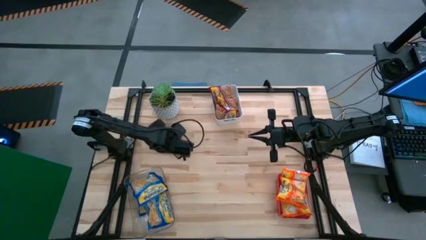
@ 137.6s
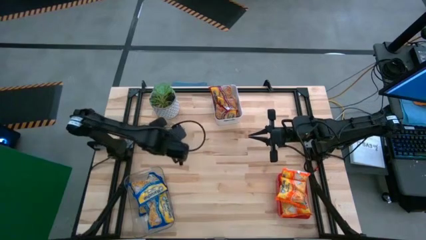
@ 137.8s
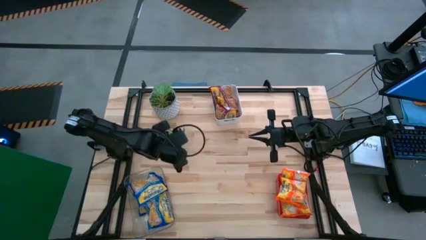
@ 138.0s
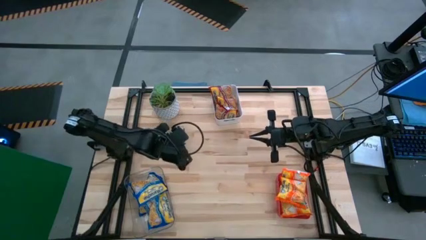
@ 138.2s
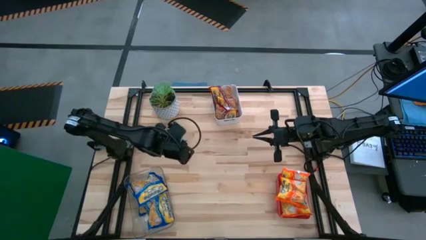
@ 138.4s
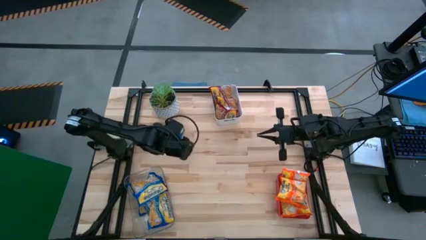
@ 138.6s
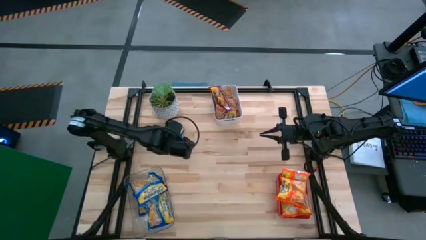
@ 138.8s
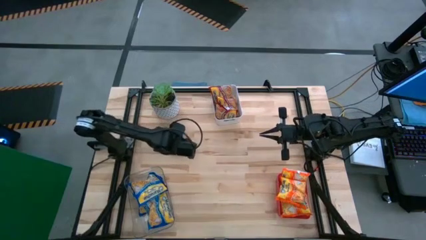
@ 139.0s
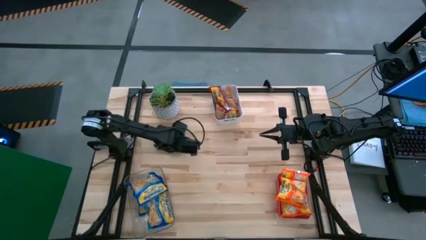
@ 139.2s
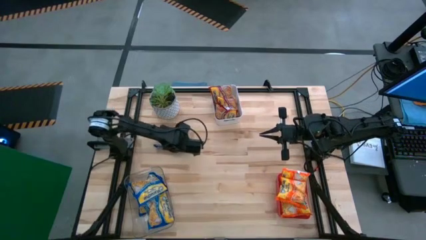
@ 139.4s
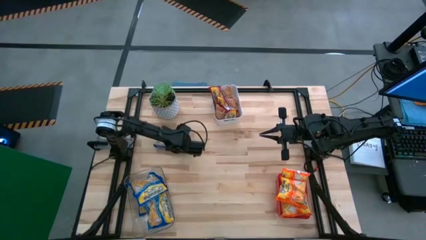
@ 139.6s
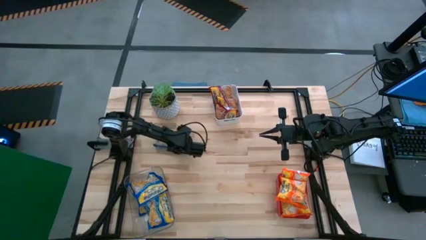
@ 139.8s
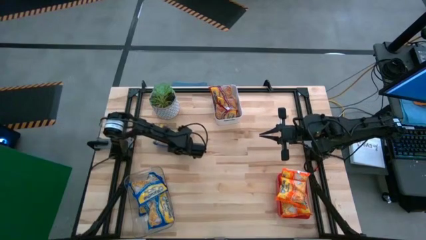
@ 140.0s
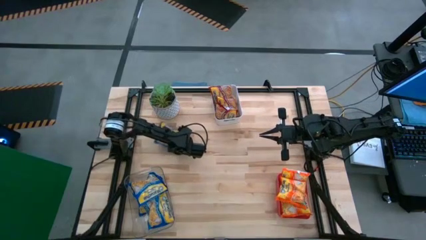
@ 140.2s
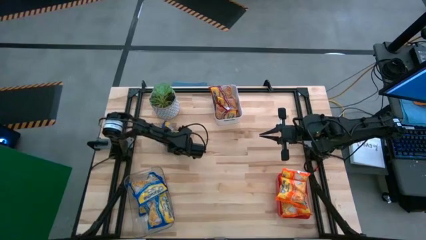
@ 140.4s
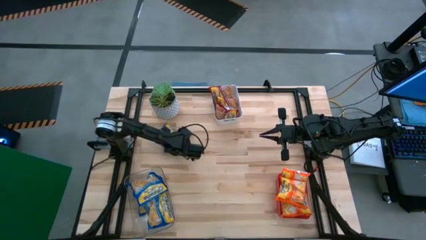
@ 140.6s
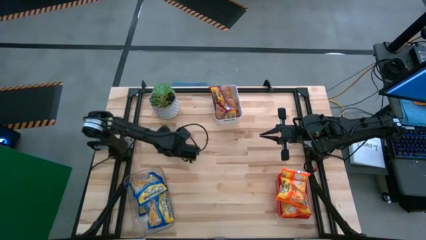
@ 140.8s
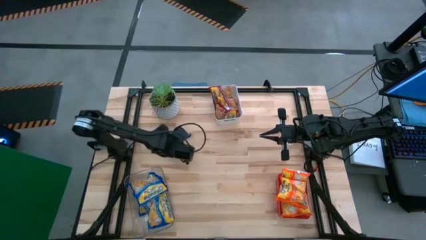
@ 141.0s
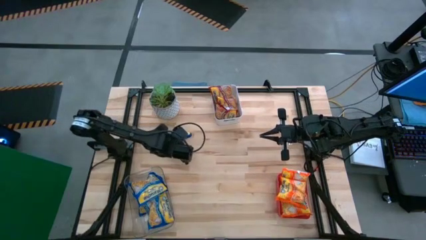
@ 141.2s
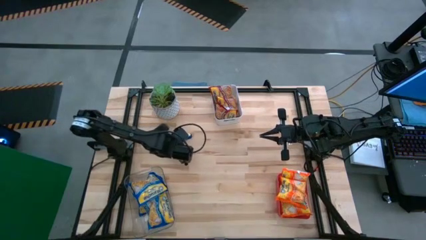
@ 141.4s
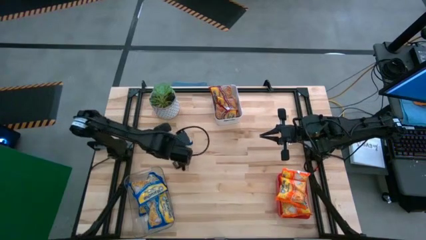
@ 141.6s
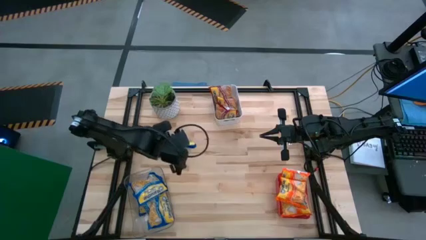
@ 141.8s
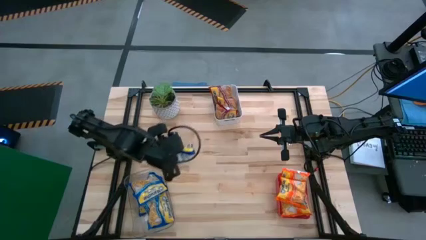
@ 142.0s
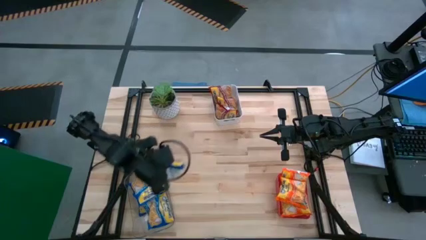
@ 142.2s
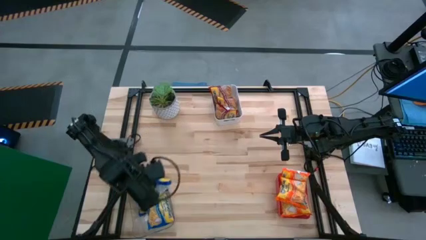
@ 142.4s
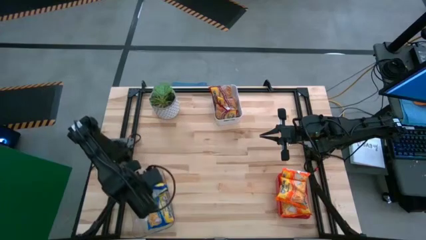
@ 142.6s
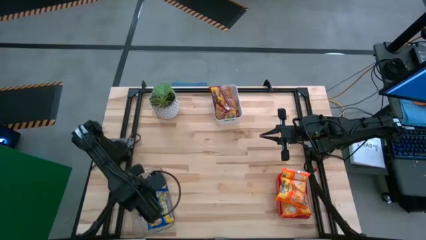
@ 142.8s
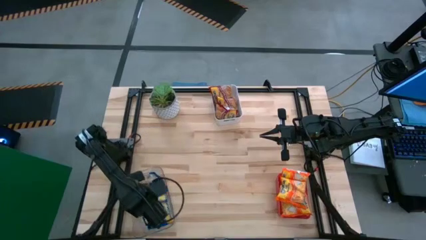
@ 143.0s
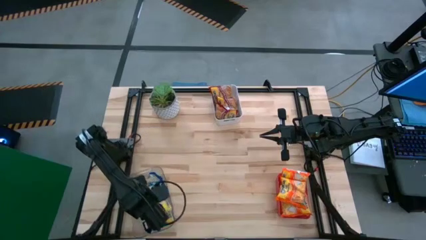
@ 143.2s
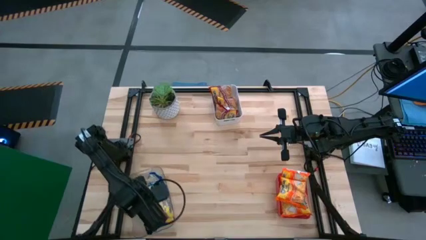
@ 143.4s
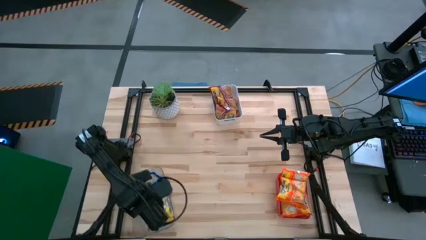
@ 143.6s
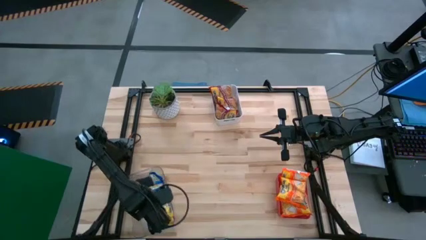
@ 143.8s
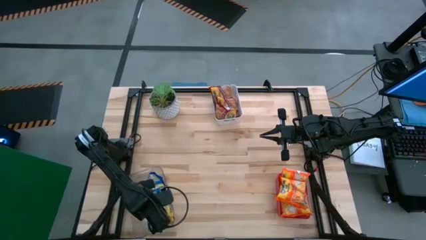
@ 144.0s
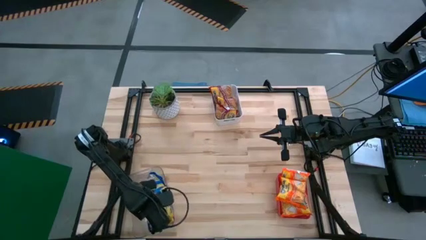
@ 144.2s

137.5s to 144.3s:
Task: Sort Maruchan noodles
Put the blue noodle pack into the transparent bin

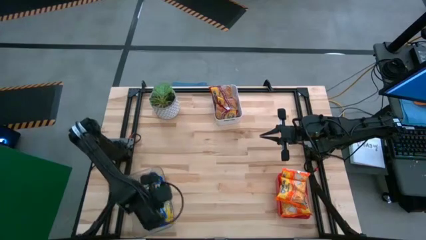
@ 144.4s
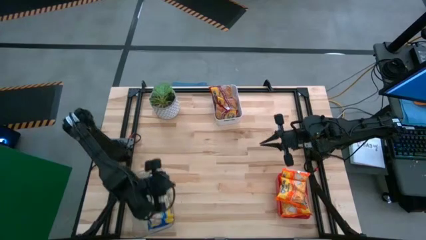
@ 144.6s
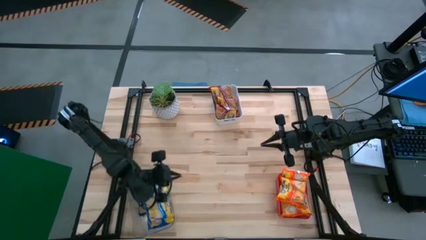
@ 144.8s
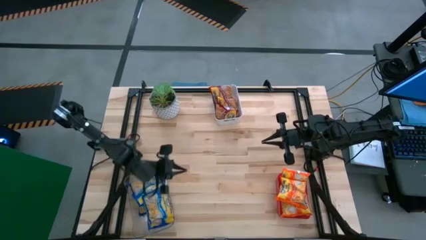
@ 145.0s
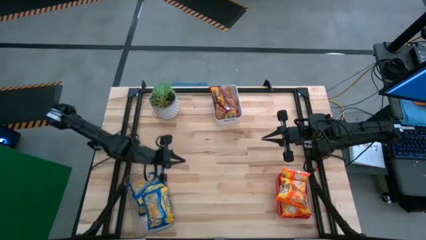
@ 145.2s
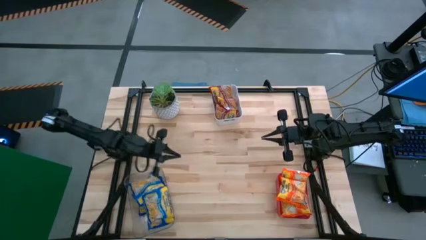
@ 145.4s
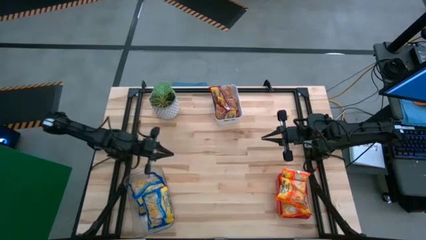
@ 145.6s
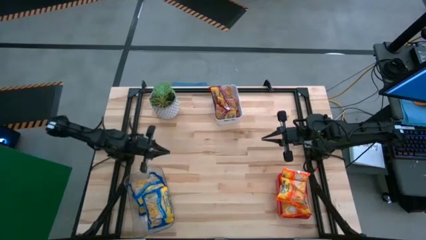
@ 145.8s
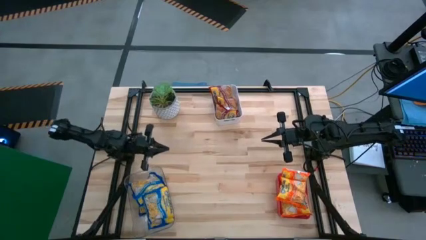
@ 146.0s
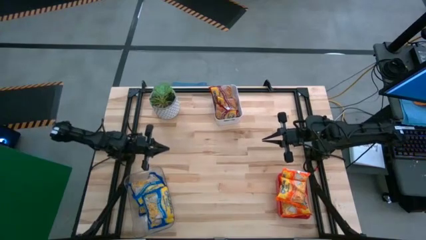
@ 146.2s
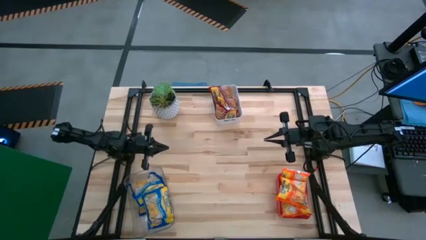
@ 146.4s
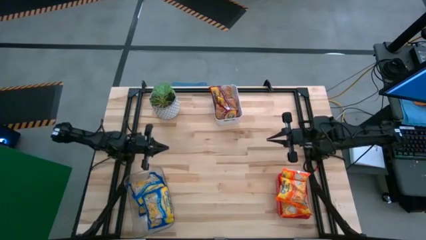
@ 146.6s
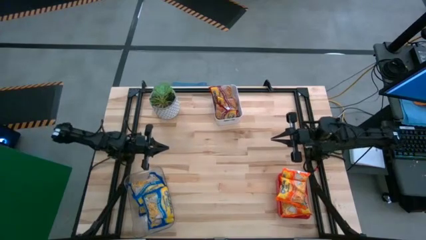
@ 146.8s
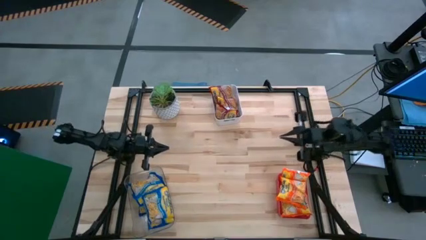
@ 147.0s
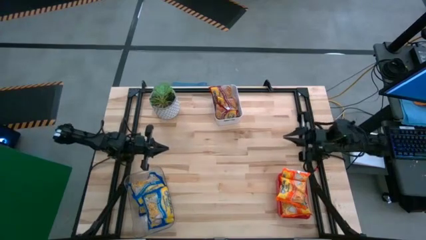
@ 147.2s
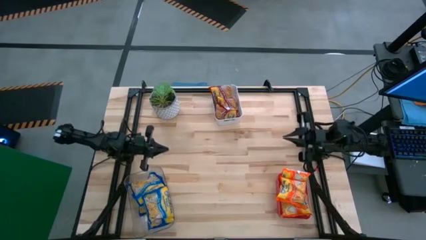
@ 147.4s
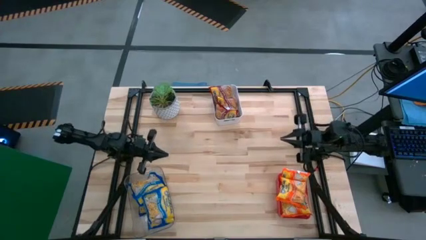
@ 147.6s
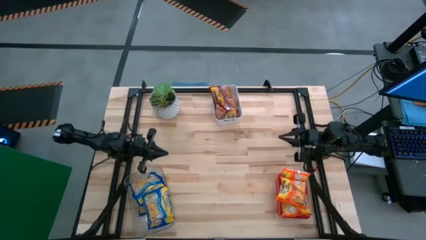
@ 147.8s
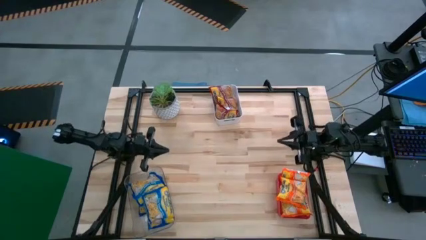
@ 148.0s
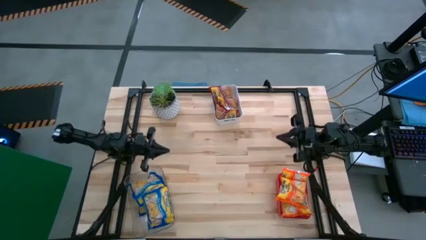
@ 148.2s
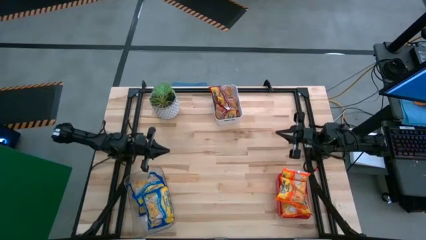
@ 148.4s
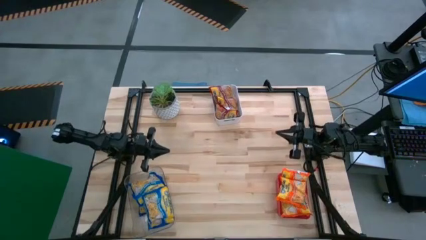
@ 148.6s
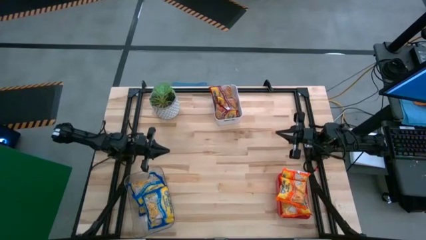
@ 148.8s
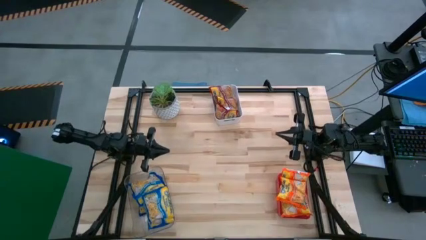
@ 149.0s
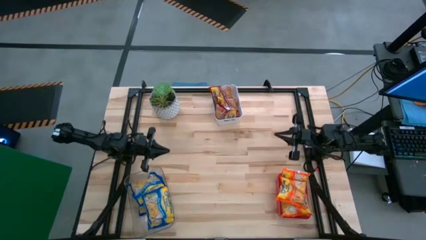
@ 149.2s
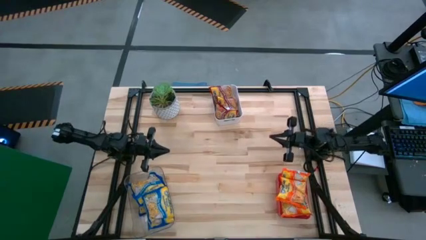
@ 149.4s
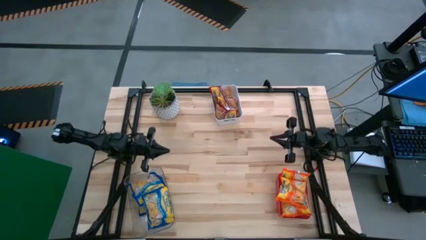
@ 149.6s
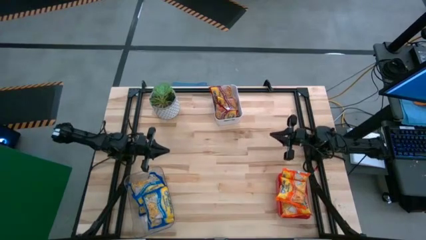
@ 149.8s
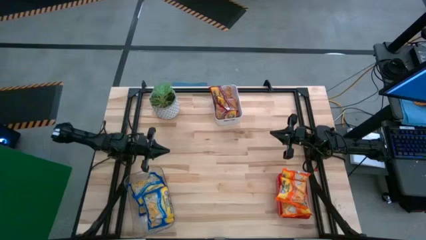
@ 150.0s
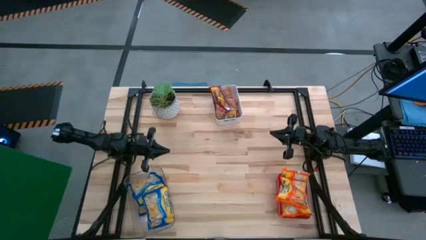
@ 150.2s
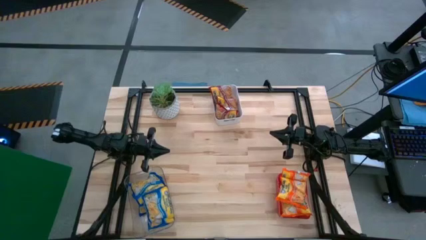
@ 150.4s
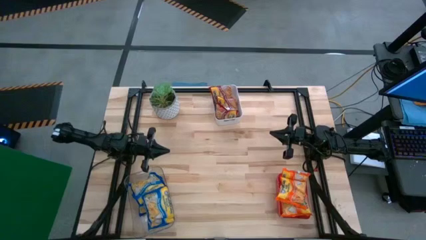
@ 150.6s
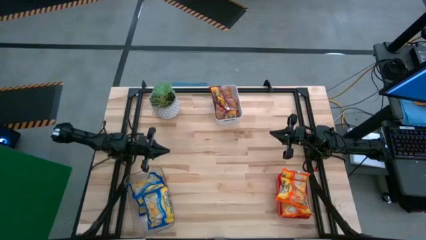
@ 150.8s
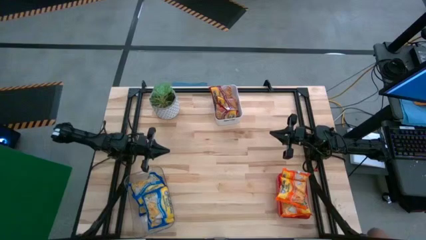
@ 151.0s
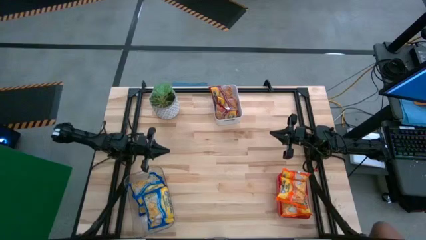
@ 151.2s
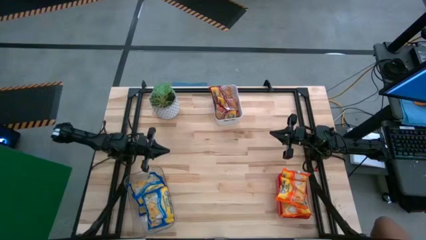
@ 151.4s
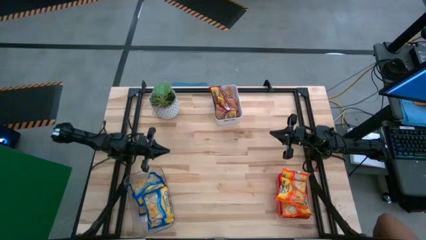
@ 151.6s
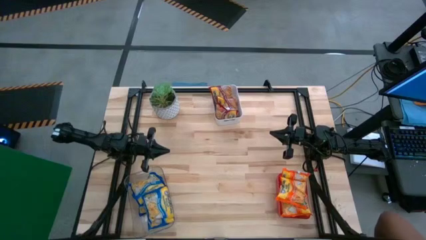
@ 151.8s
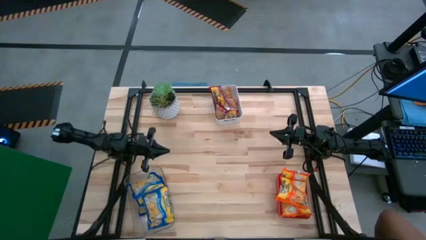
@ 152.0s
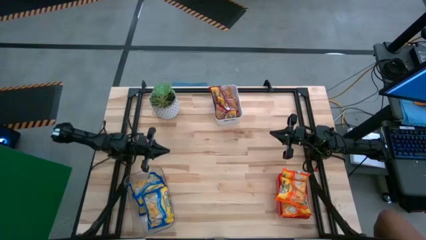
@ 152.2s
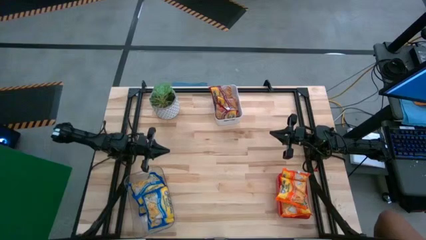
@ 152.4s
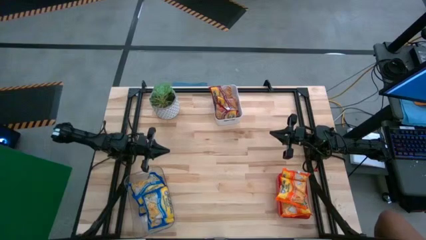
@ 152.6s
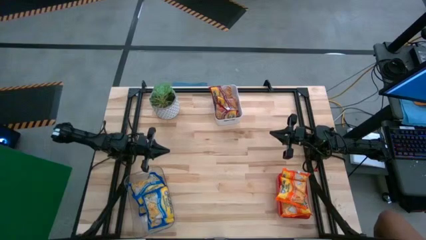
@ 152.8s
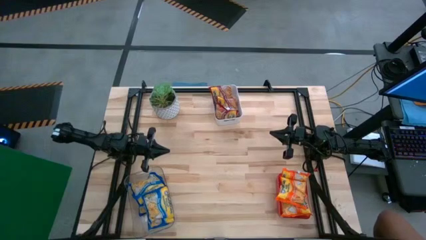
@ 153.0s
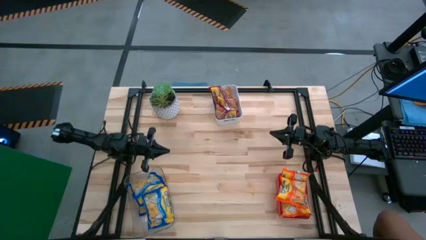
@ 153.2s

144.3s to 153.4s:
Return to Home Position

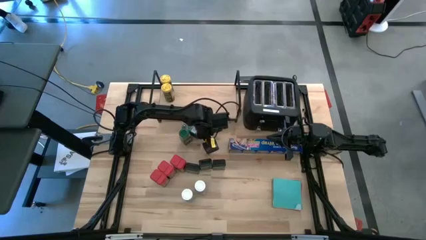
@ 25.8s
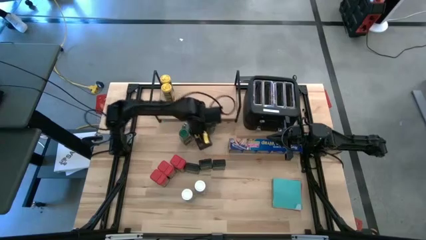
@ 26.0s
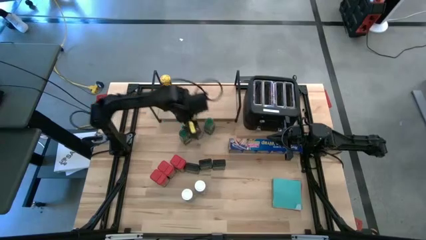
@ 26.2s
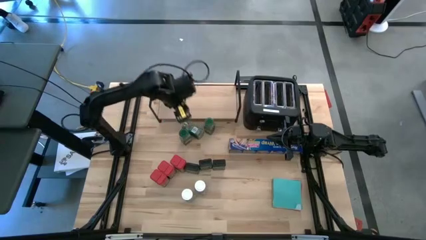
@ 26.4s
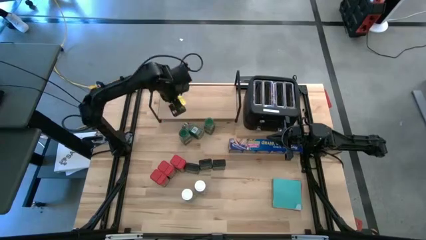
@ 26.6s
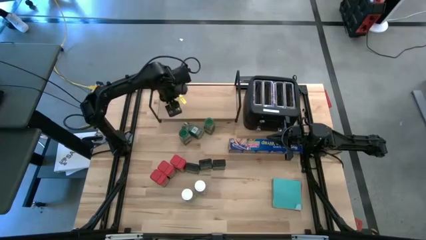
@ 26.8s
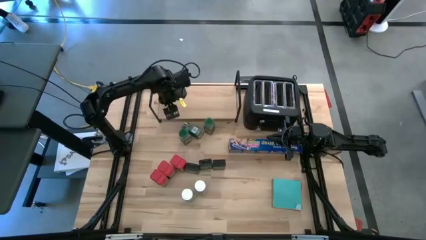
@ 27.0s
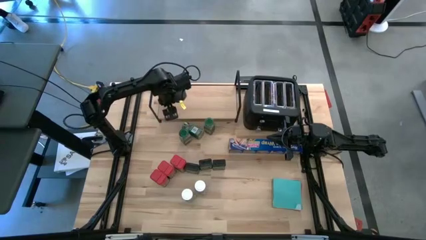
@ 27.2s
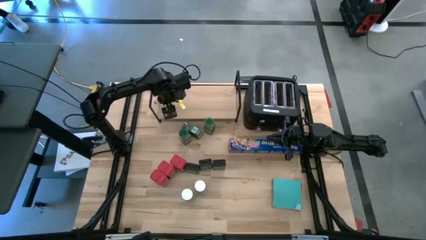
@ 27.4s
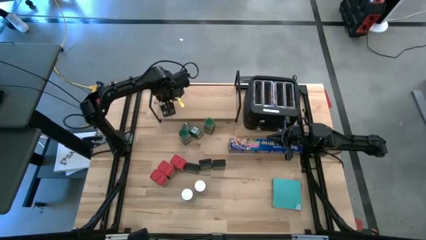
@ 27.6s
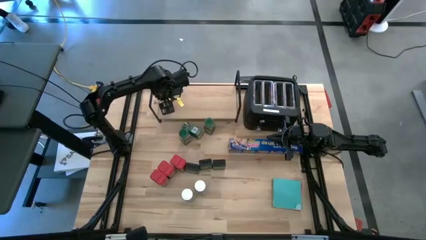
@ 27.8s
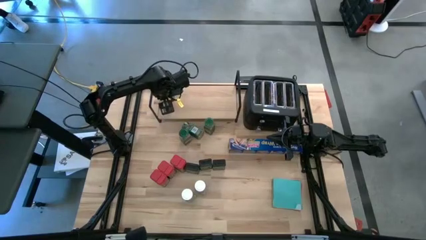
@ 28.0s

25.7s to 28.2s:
Task: Shelf spices
Put the yellow seasoning bottle on the shelf aligned with the other yellow seasoning bottles
